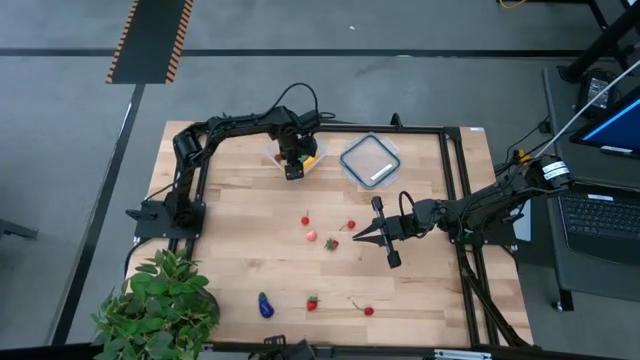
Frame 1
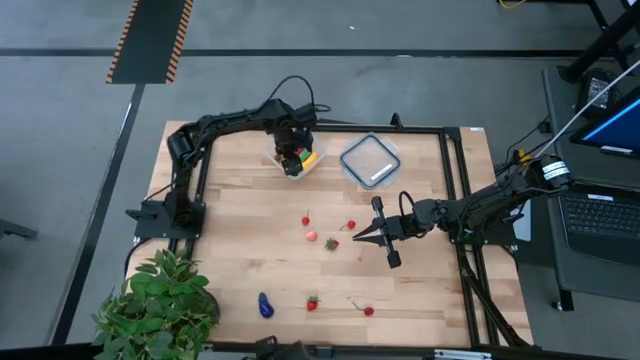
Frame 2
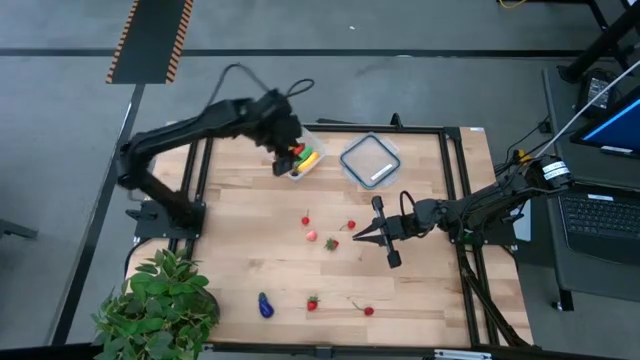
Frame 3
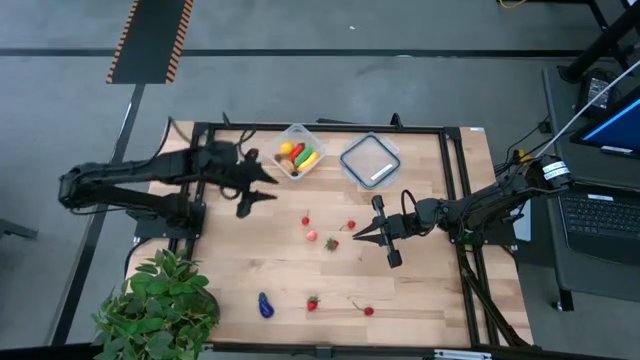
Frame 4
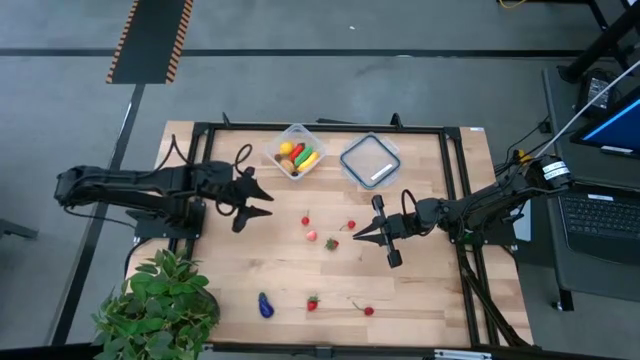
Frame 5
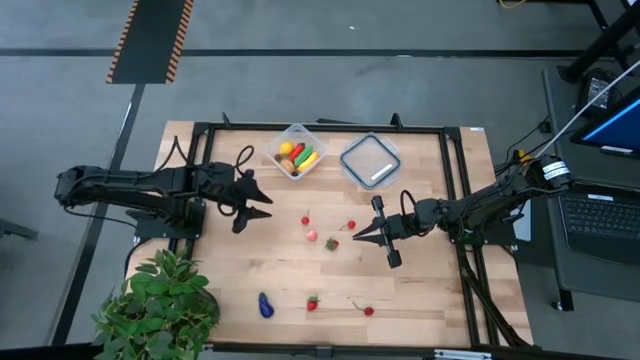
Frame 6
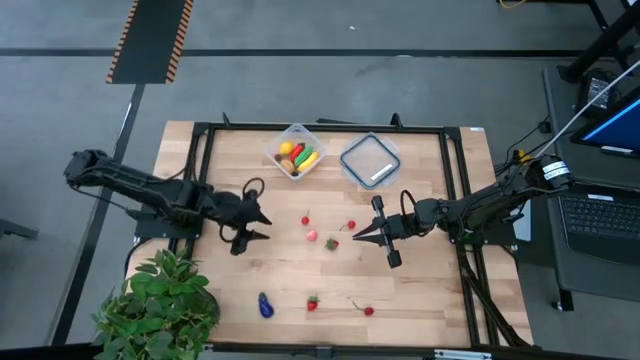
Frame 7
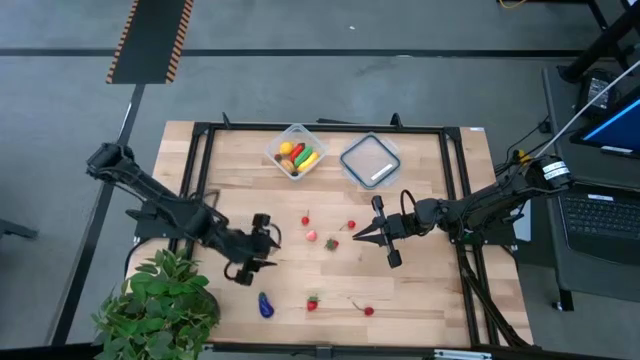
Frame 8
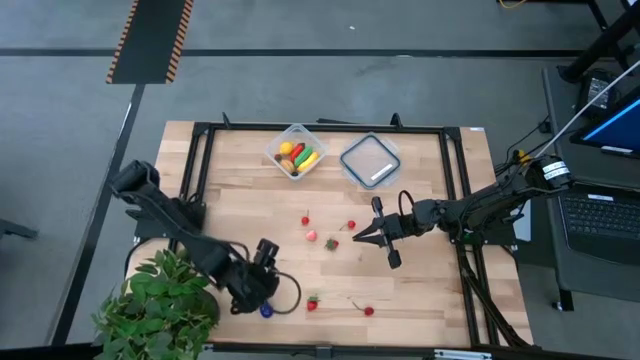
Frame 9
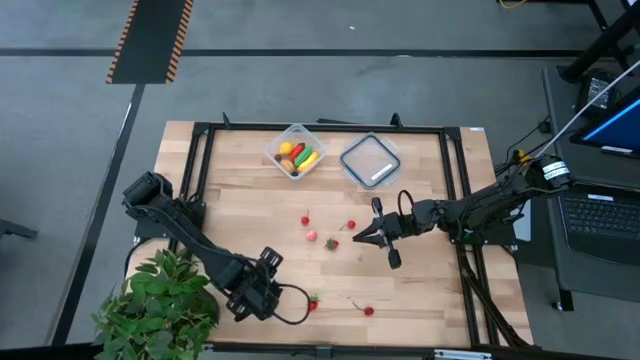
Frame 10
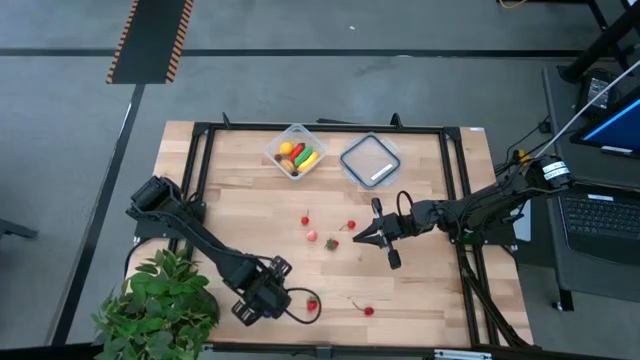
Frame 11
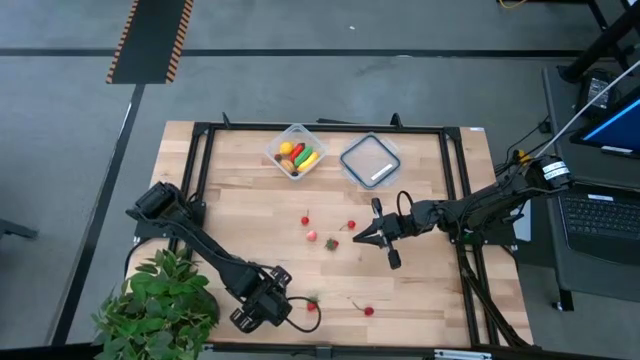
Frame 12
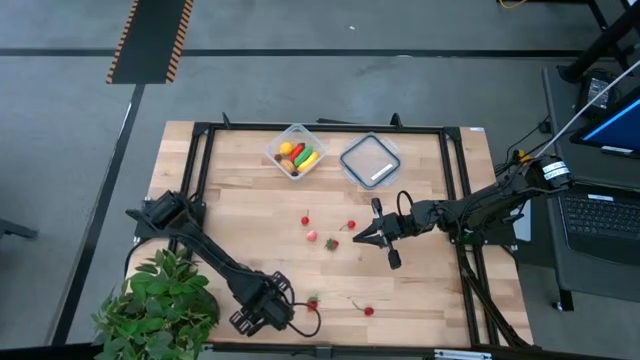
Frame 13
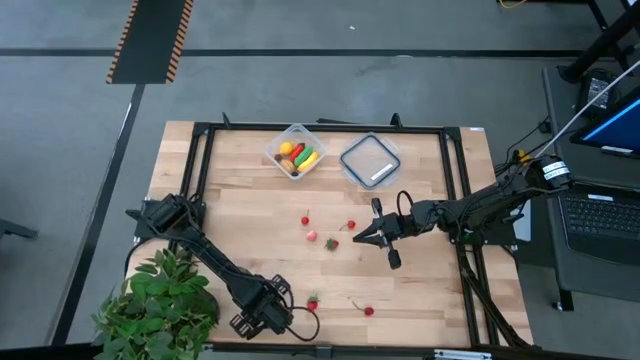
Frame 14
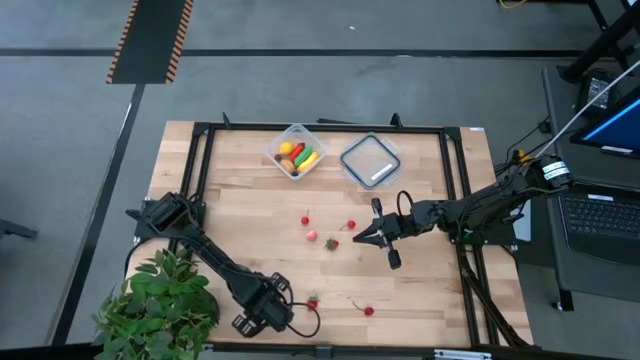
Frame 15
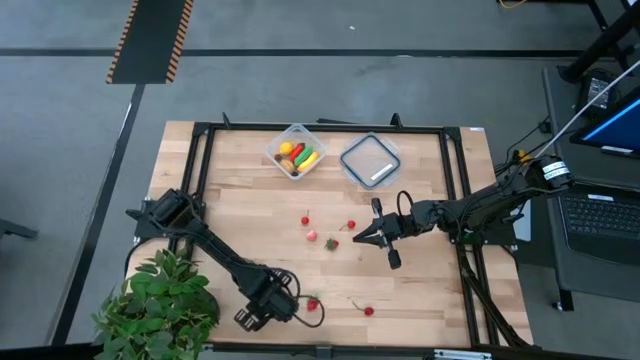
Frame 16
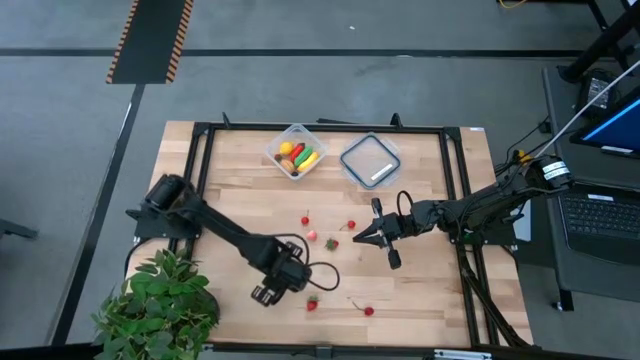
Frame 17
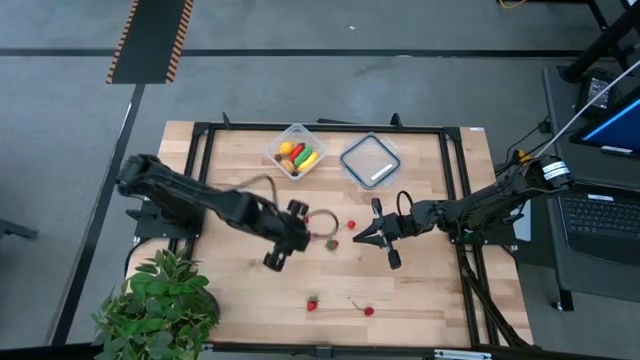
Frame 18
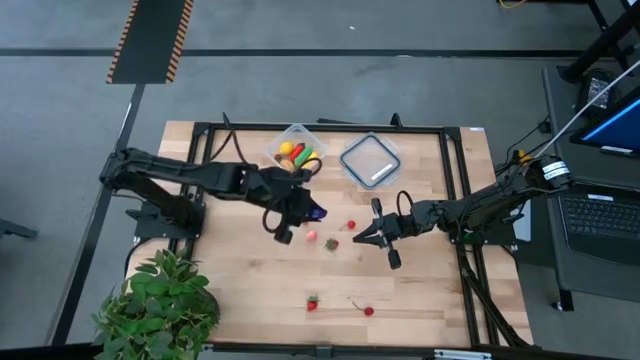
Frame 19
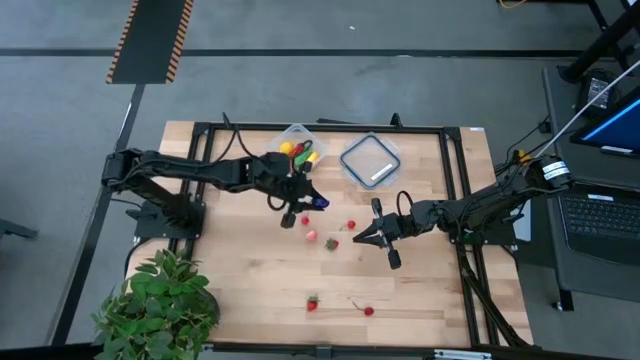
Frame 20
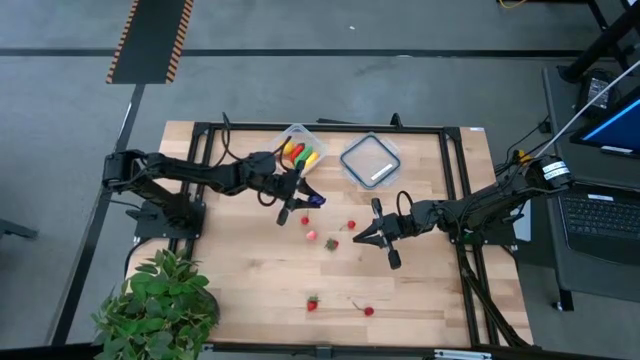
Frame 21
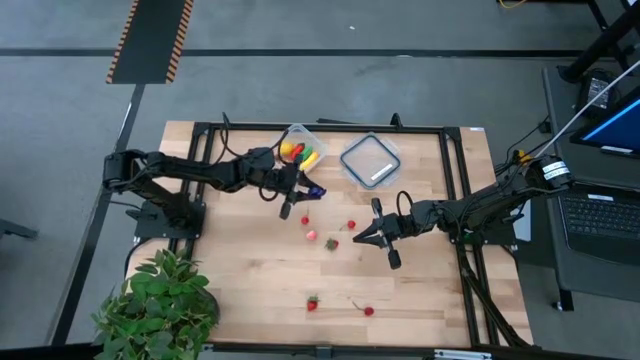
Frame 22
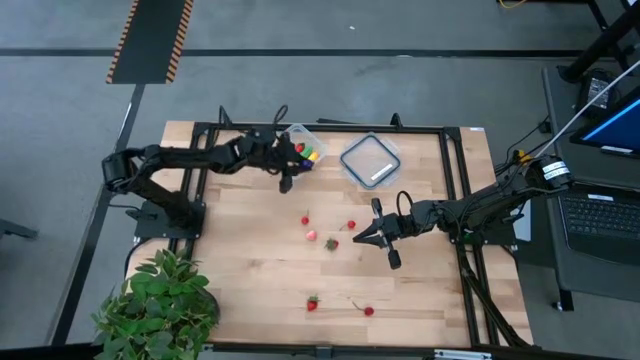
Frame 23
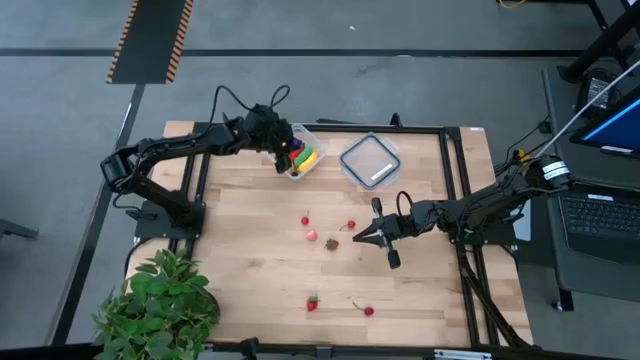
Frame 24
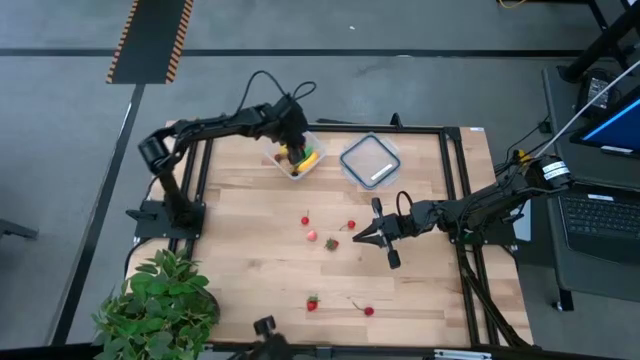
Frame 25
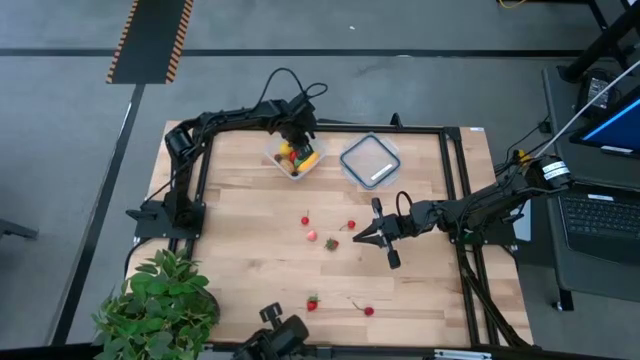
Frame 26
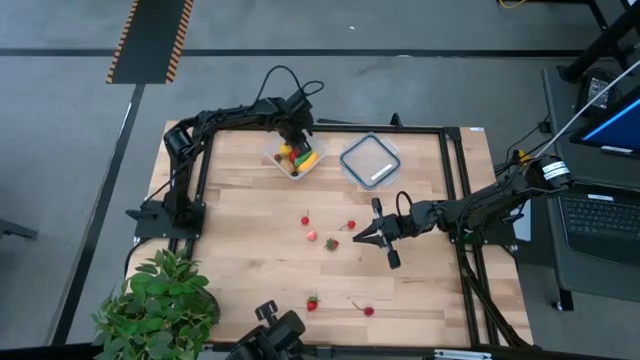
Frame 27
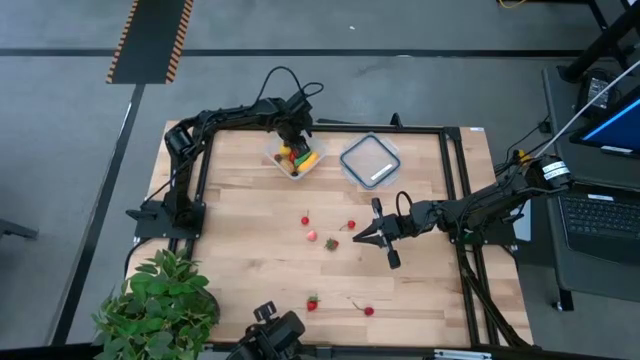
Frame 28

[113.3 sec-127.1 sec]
Task: Pick and placing Produce into tupperware
Put the eggplant into the transparent container

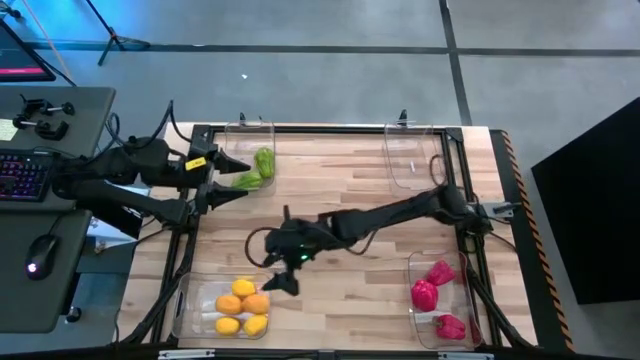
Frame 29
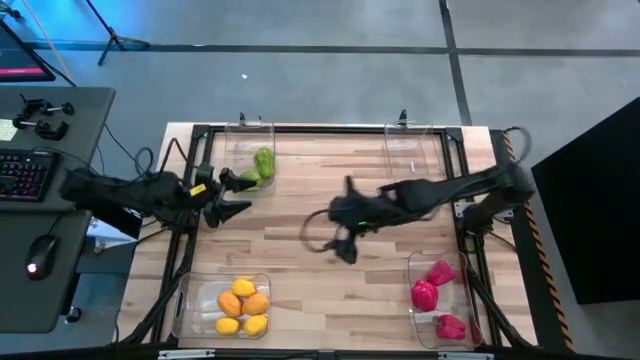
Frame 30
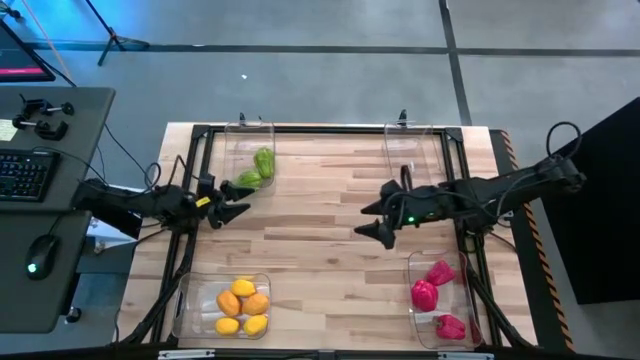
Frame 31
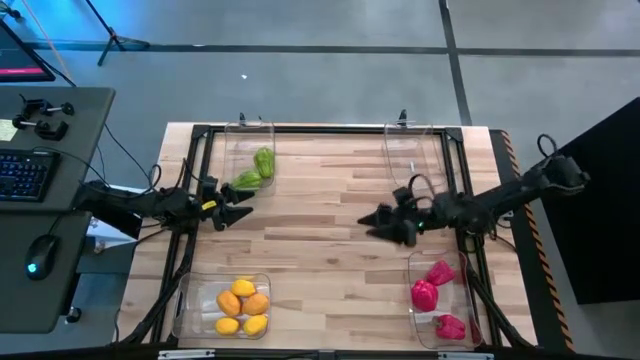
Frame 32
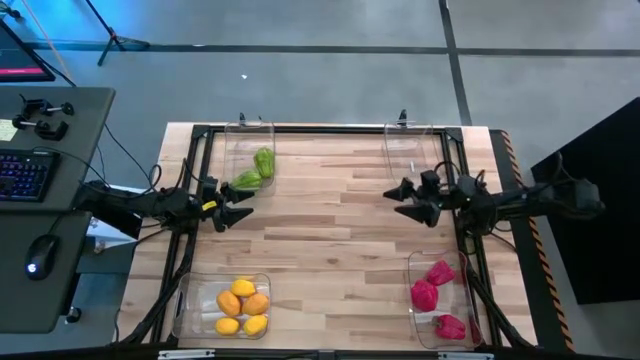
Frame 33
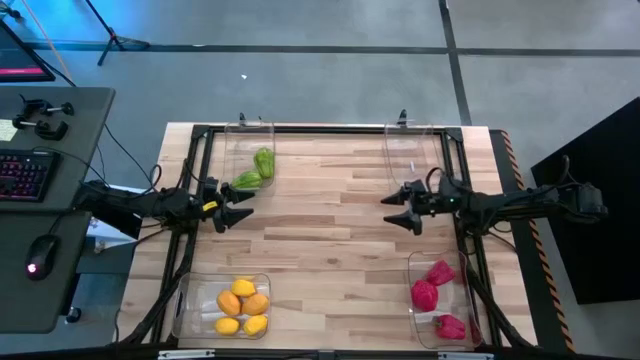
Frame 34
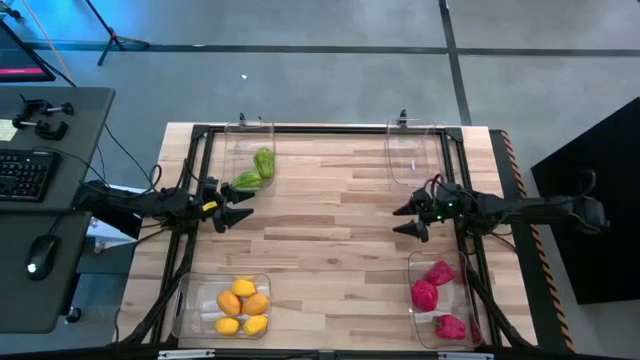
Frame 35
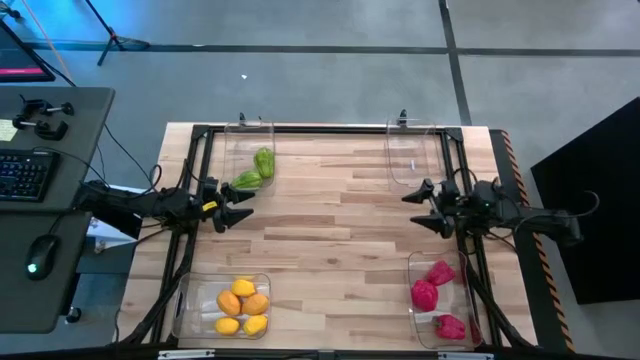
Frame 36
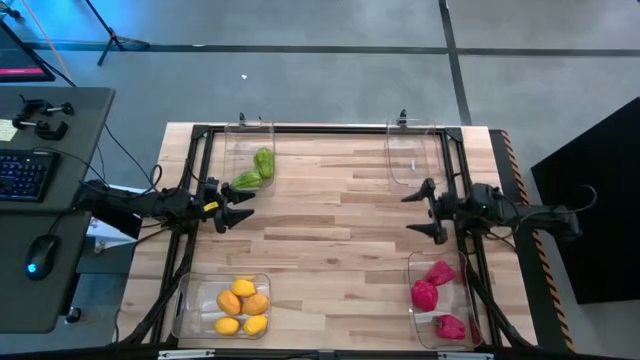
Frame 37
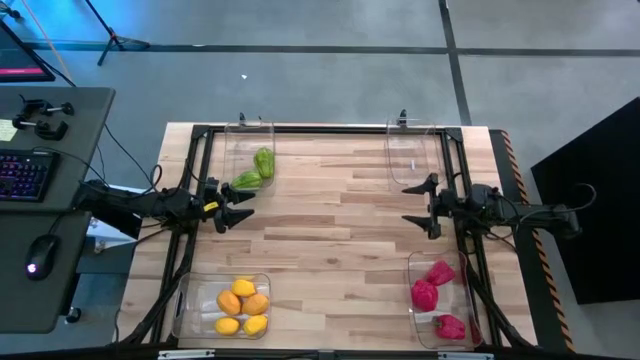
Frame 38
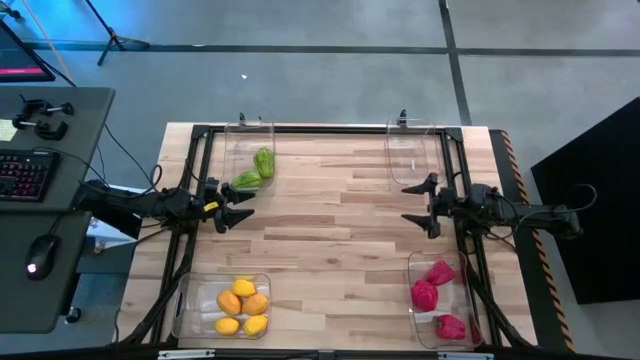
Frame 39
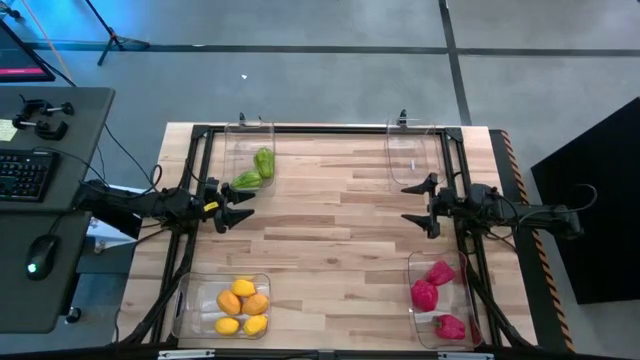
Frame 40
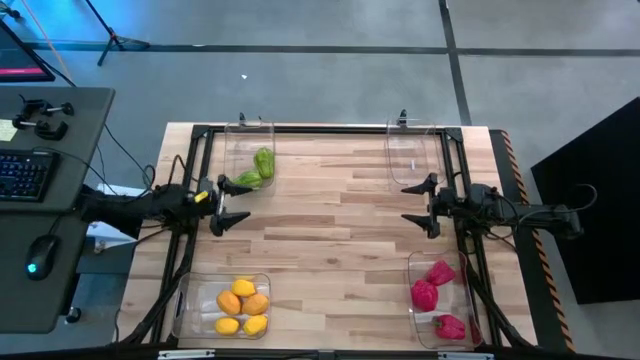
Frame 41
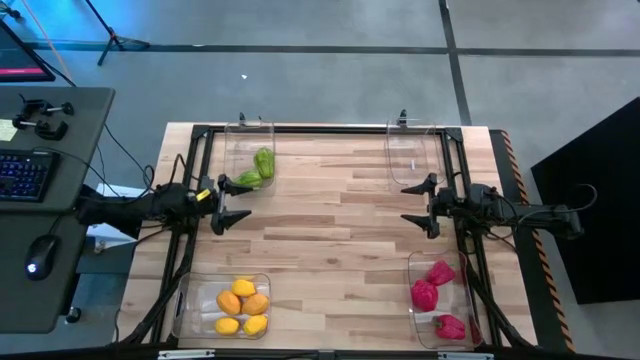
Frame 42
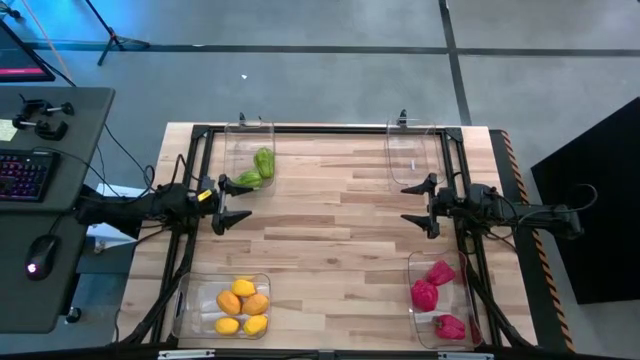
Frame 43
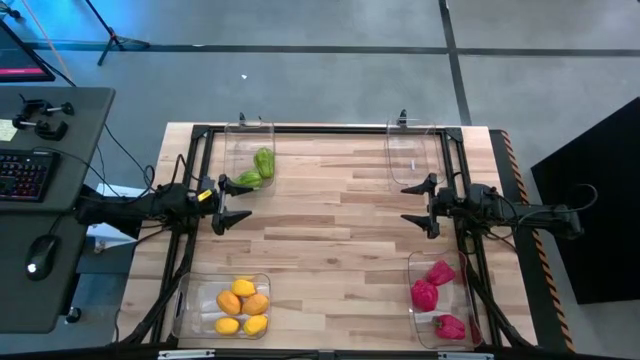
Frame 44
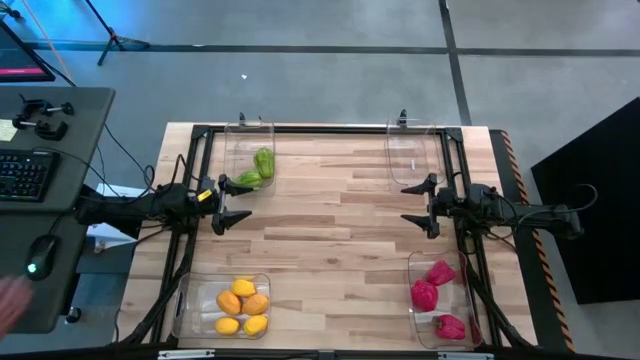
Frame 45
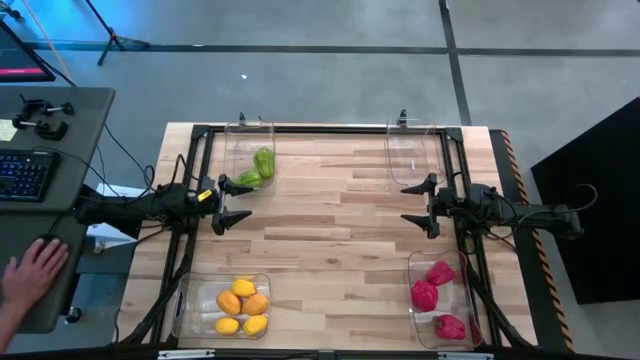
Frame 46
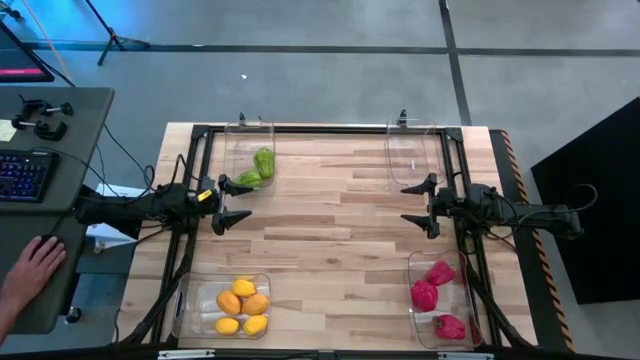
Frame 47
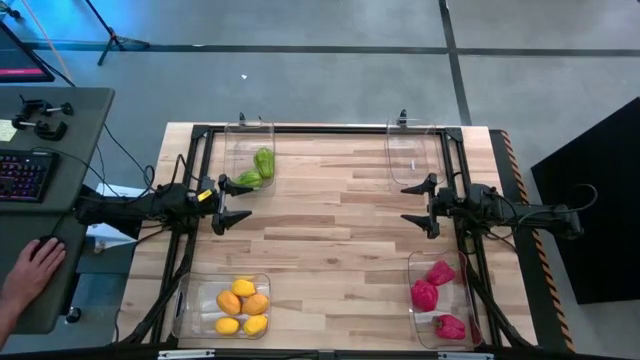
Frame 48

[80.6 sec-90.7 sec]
Task: Sort produce into baskets
Return to Home Position
